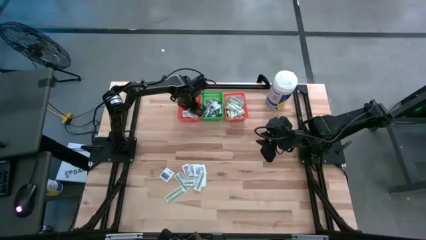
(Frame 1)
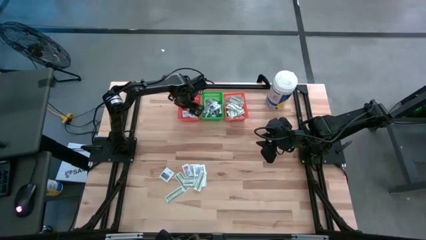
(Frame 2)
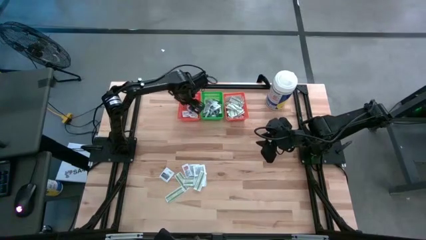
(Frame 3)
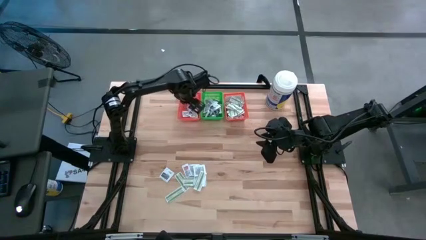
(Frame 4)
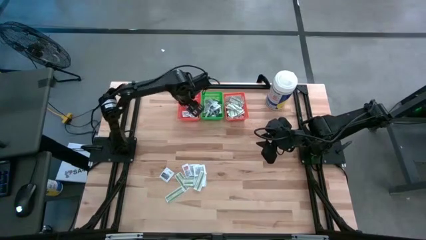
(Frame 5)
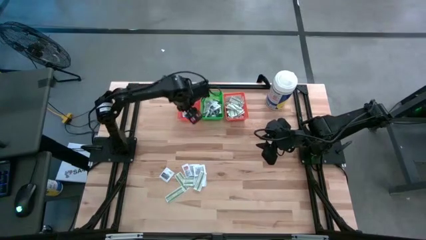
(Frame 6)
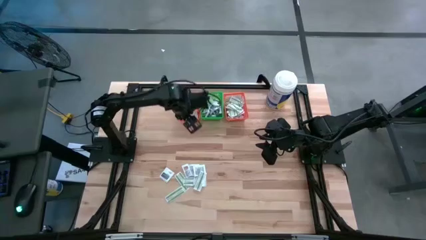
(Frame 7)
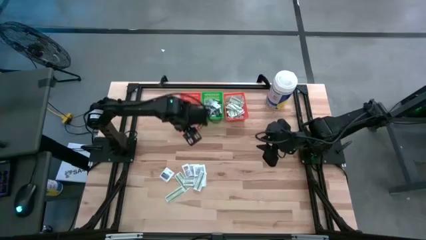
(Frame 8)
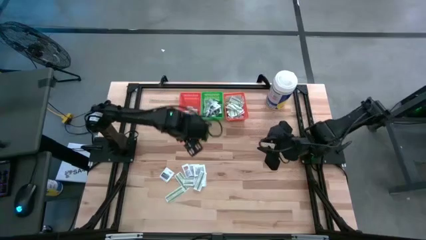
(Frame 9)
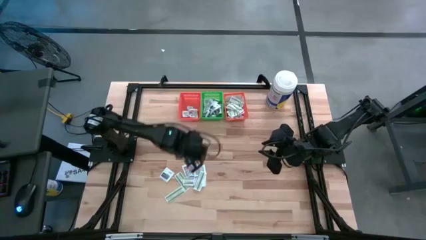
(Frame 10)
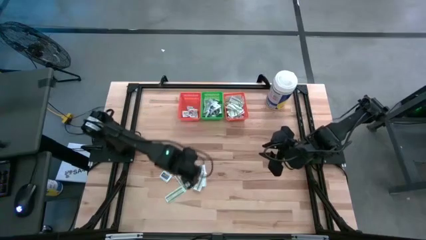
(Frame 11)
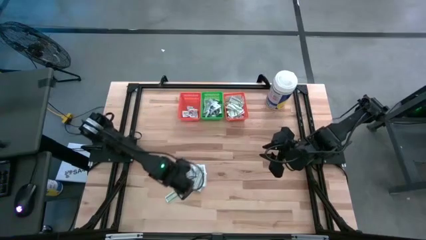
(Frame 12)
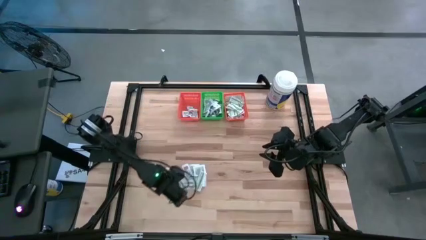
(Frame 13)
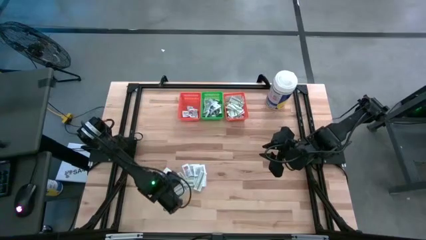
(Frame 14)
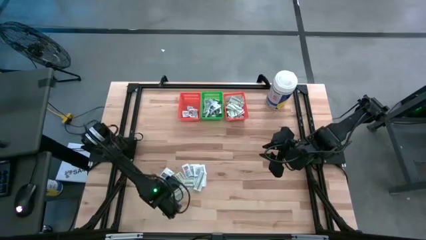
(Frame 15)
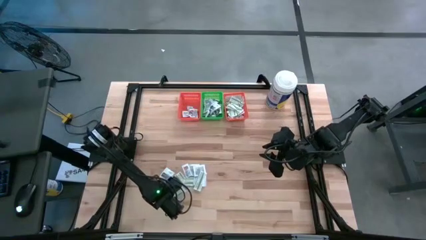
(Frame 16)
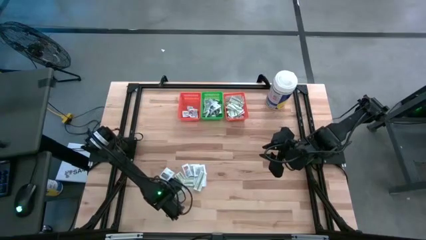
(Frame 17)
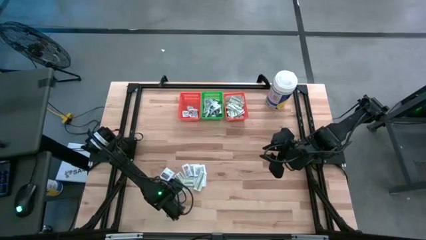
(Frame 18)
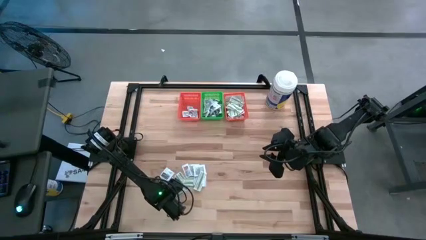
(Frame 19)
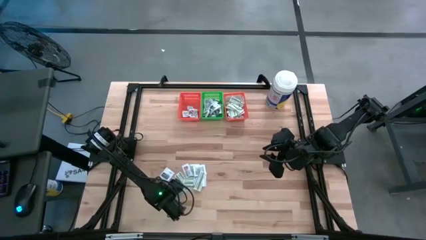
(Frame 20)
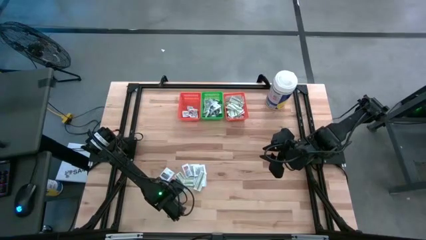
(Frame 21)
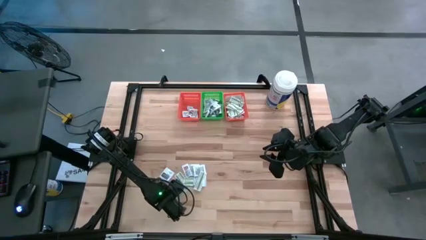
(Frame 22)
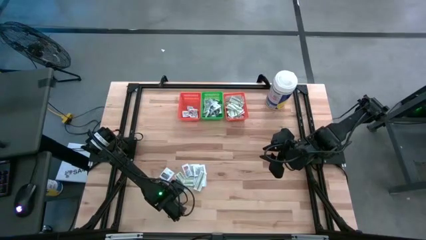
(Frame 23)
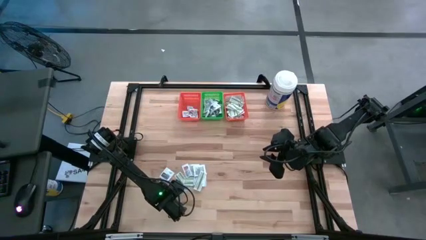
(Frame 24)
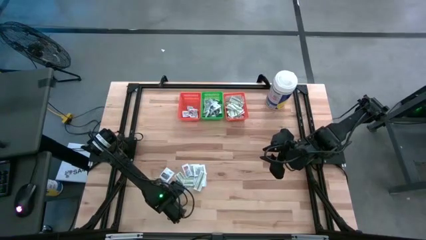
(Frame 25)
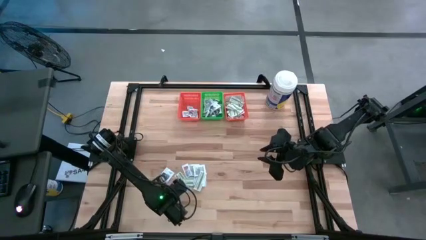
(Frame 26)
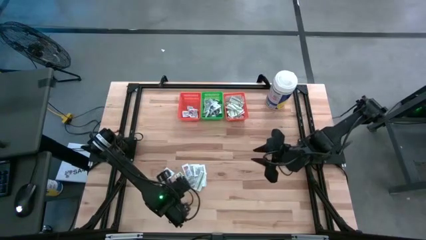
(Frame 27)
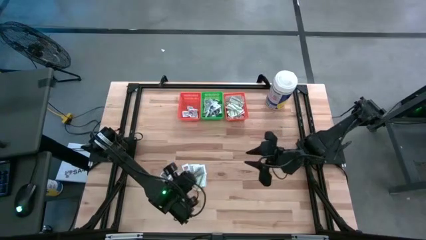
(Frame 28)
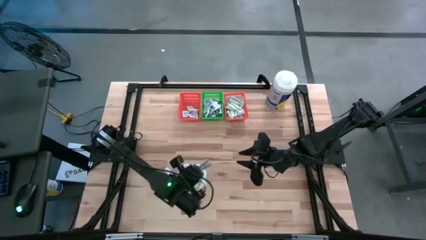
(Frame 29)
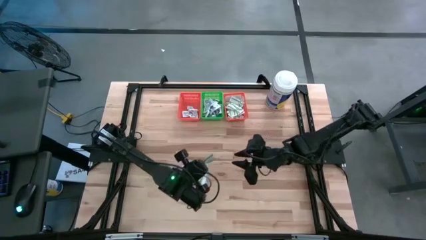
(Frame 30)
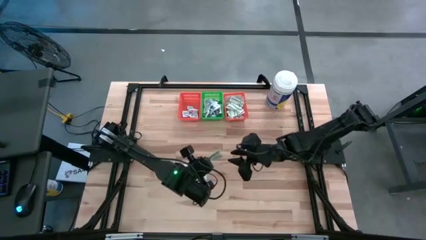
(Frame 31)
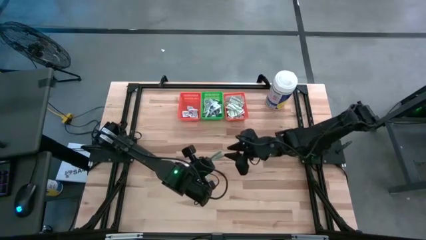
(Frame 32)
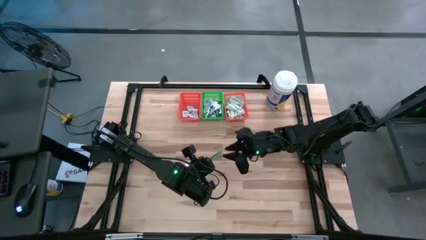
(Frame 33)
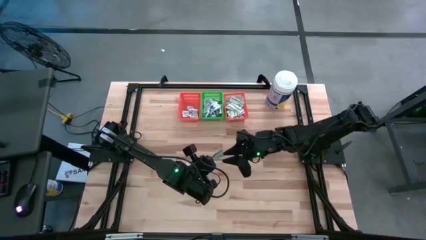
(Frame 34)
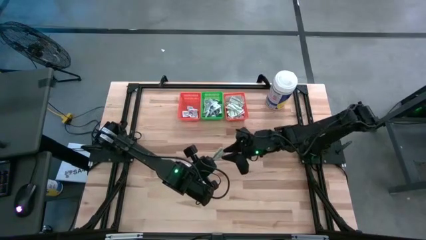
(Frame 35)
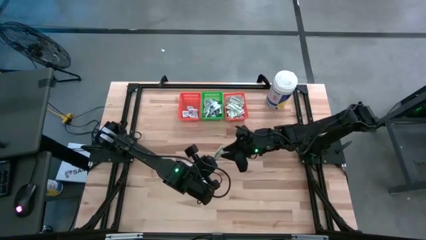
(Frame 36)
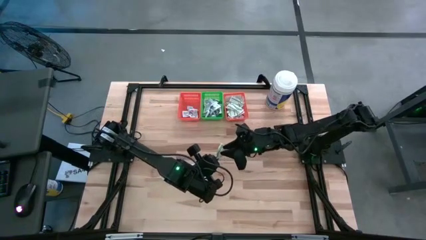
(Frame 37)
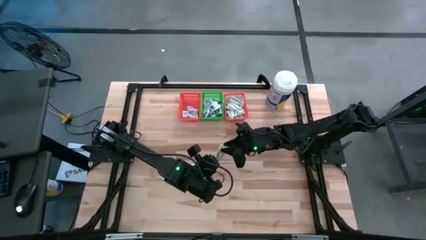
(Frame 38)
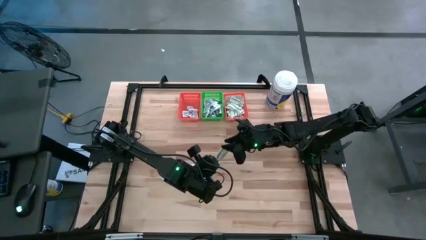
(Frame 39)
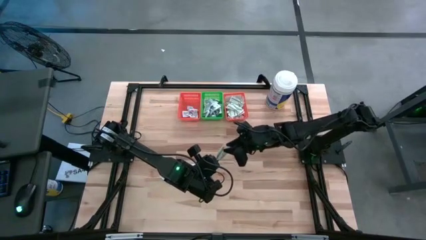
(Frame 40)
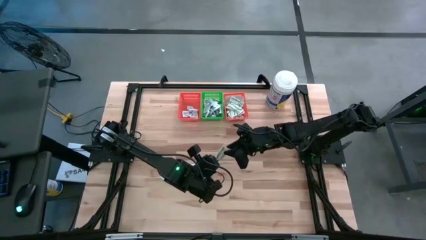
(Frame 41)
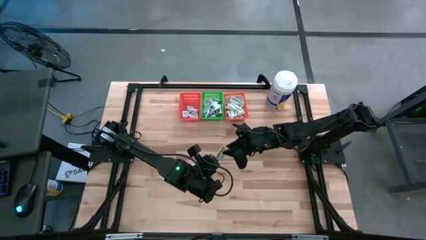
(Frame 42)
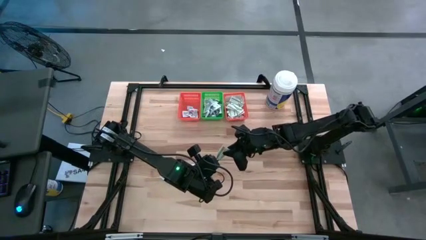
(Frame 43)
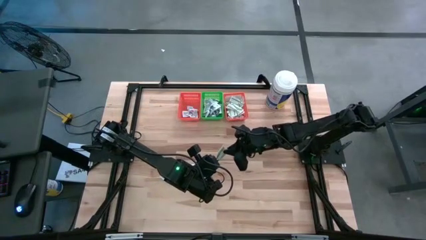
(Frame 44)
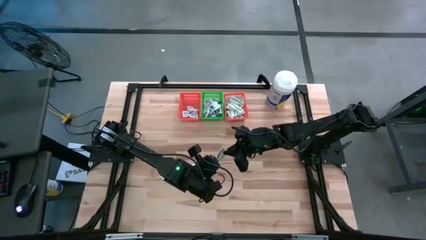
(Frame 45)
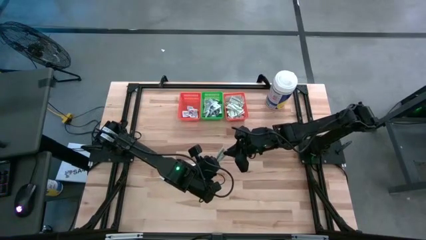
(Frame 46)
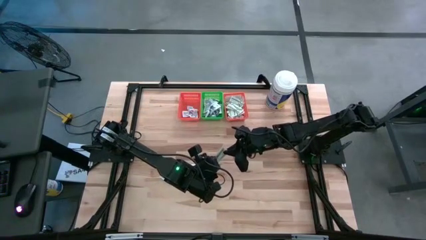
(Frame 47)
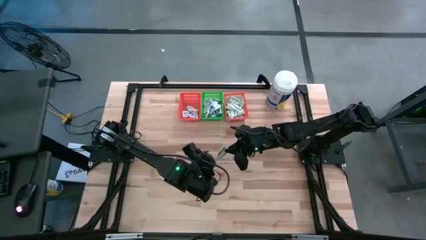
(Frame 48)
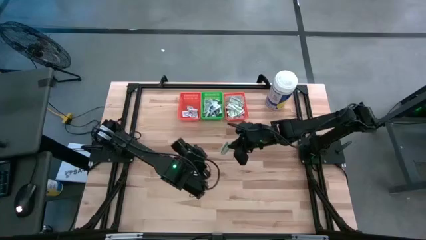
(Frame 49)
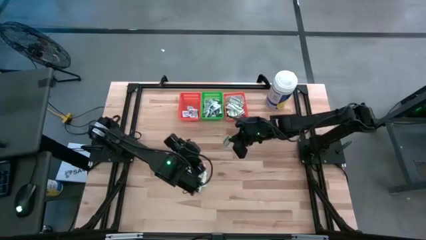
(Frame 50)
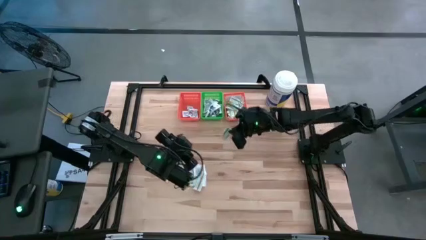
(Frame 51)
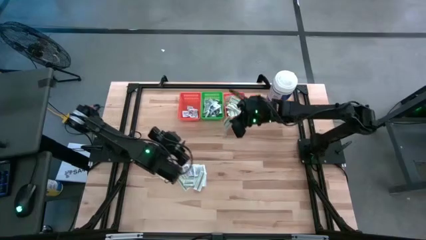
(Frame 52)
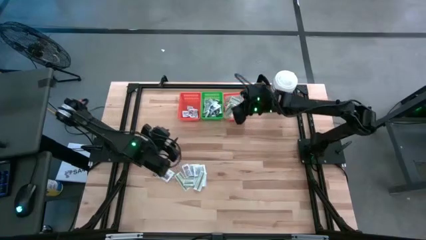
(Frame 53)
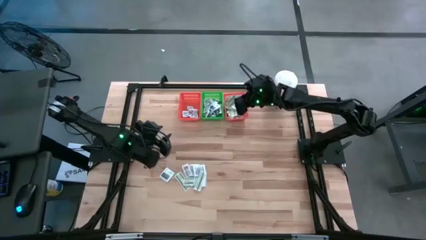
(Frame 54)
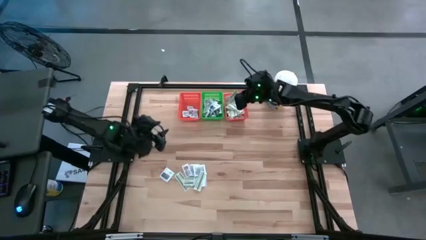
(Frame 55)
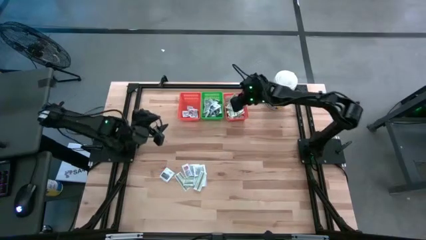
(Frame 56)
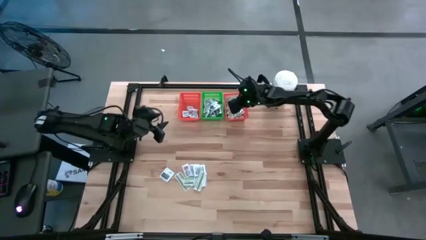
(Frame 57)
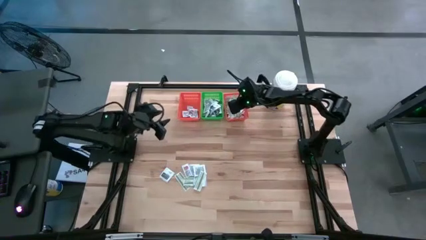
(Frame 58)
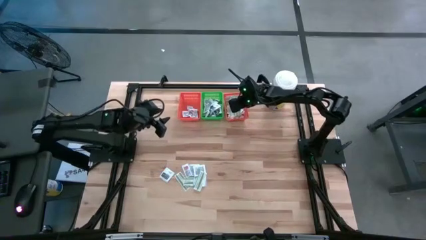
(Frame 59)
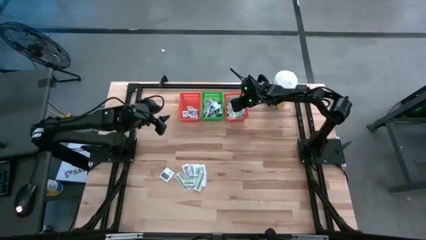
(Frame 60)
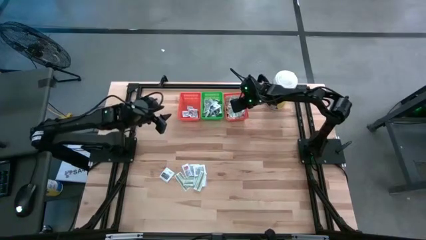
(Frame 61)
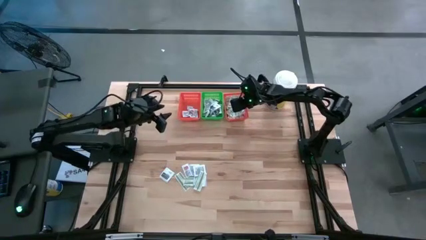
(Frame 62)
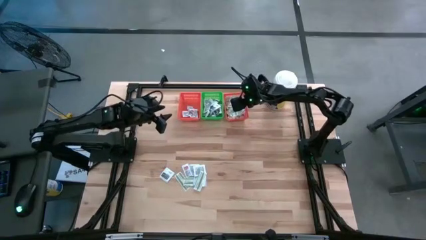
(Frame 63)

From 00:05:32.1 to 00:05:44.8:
Task: Pick & Place First Aid Supplies
Put the bandage pack into the right orange bin
